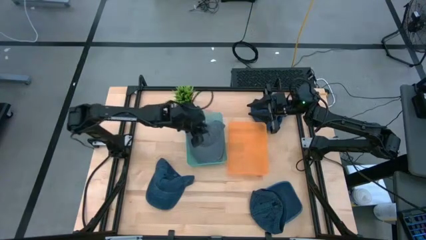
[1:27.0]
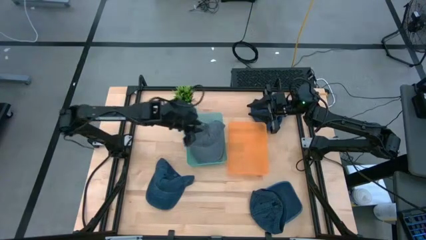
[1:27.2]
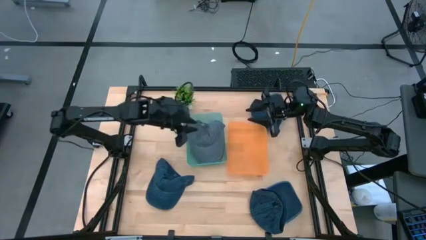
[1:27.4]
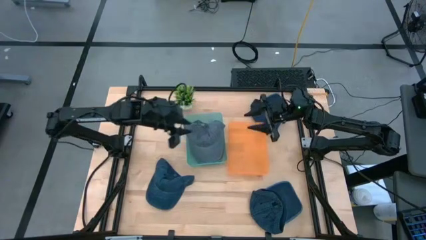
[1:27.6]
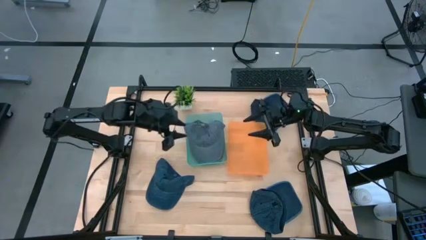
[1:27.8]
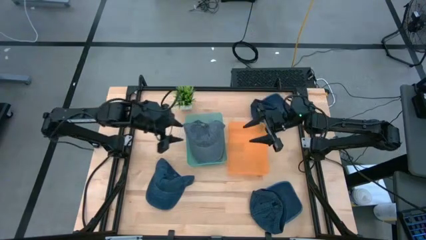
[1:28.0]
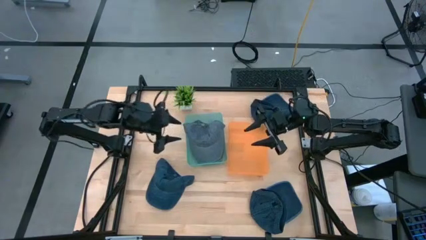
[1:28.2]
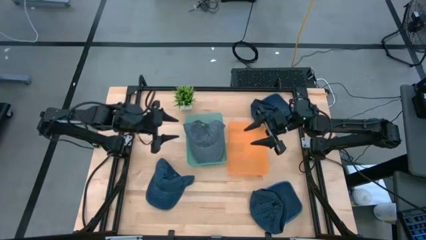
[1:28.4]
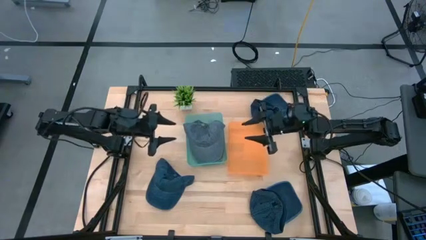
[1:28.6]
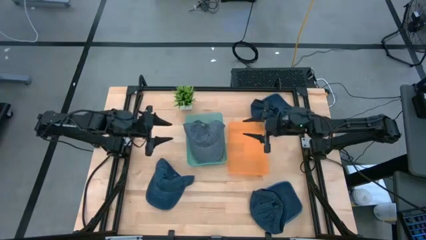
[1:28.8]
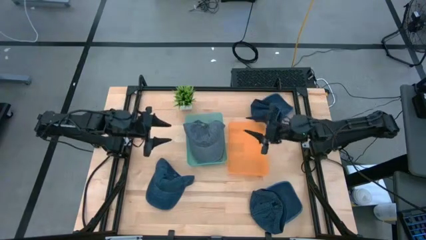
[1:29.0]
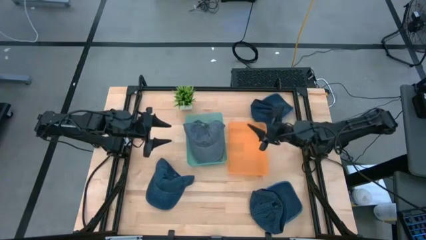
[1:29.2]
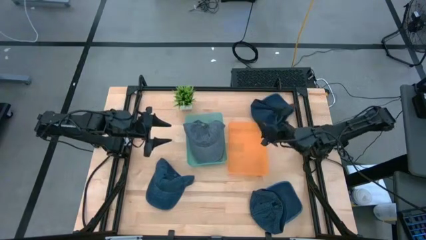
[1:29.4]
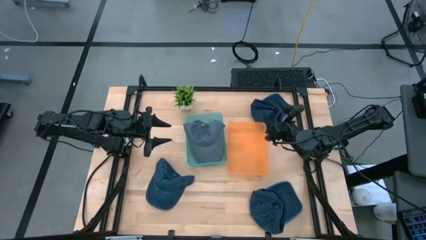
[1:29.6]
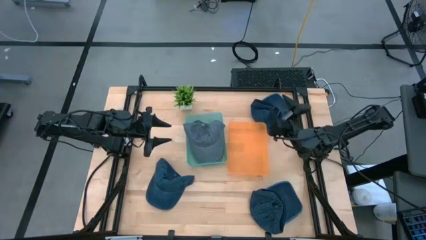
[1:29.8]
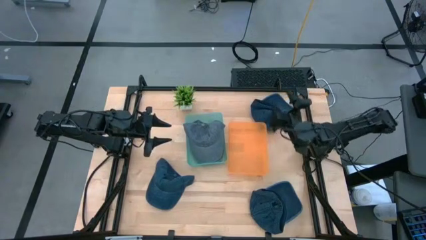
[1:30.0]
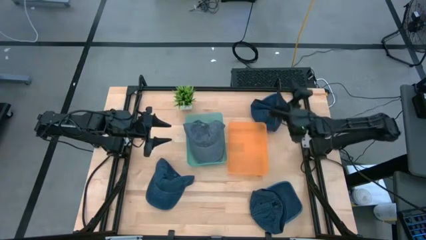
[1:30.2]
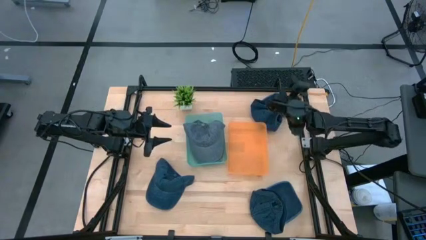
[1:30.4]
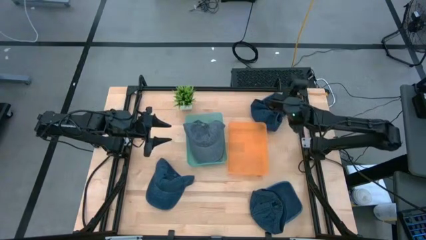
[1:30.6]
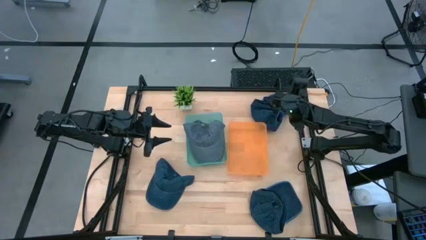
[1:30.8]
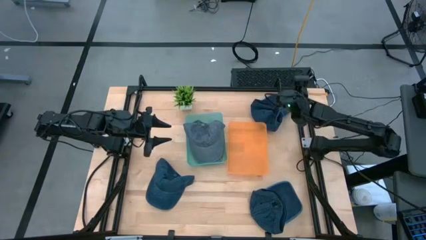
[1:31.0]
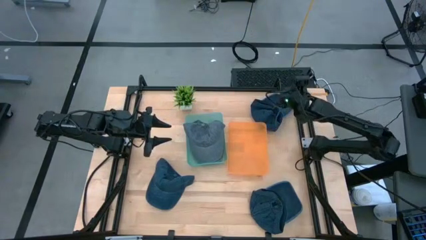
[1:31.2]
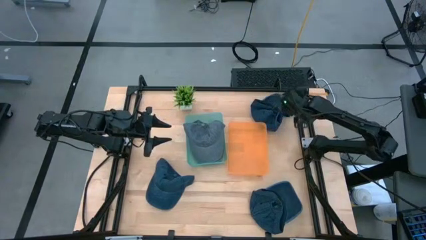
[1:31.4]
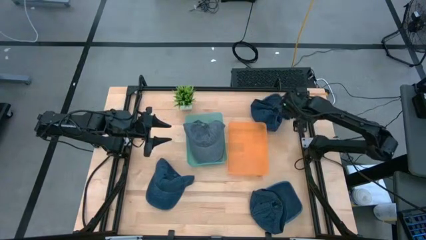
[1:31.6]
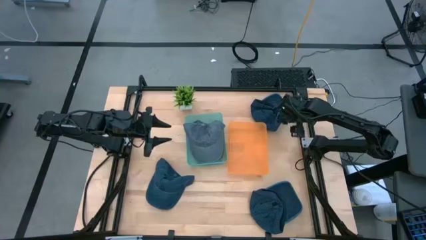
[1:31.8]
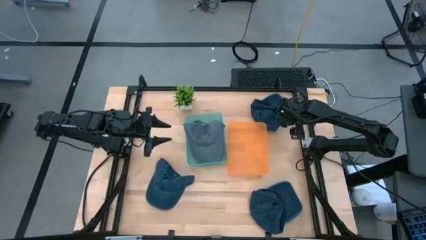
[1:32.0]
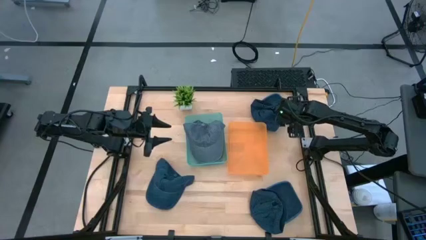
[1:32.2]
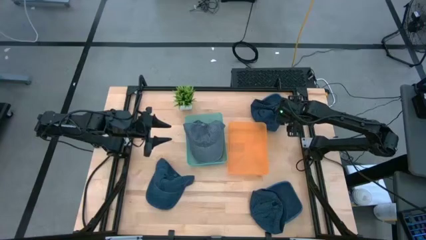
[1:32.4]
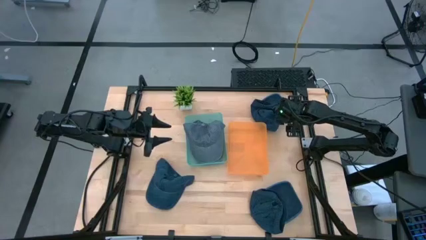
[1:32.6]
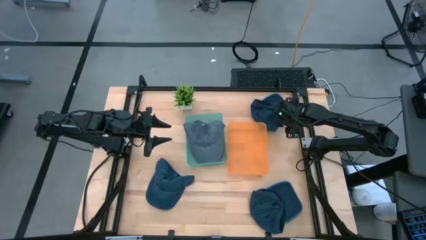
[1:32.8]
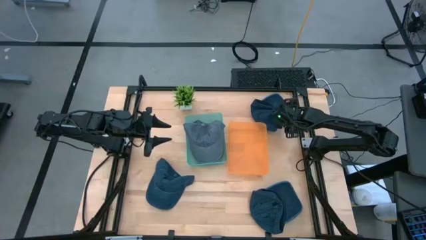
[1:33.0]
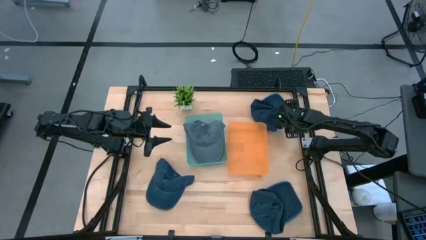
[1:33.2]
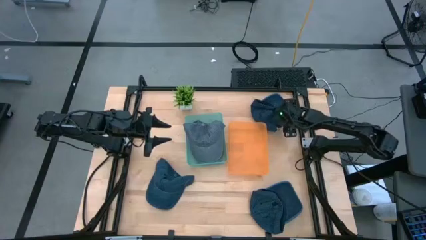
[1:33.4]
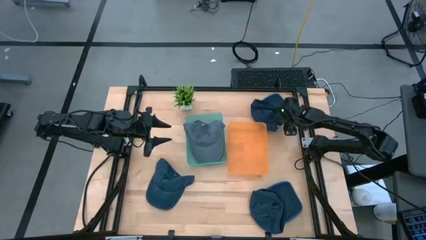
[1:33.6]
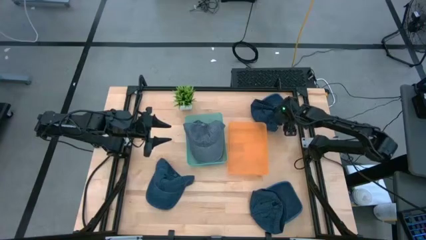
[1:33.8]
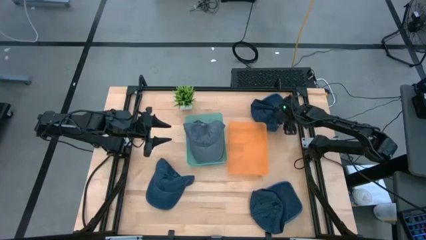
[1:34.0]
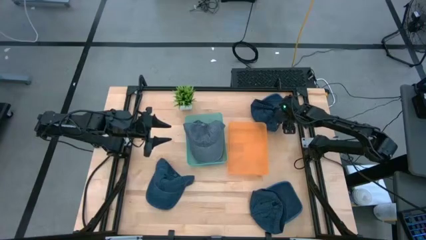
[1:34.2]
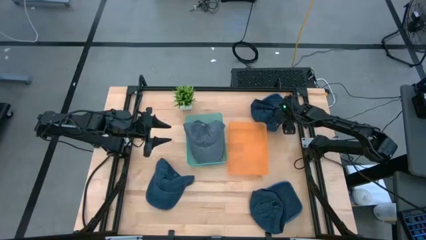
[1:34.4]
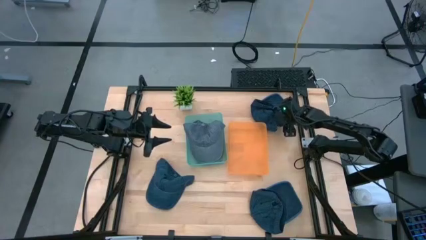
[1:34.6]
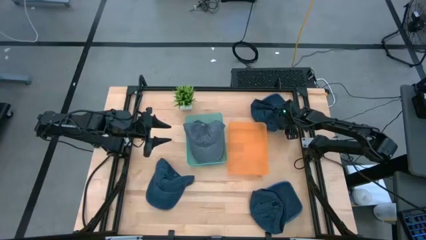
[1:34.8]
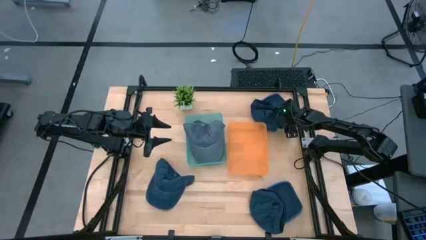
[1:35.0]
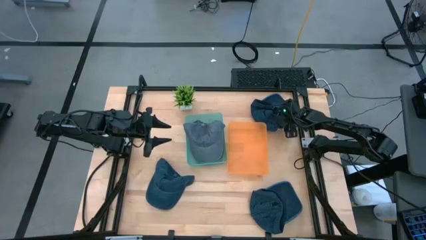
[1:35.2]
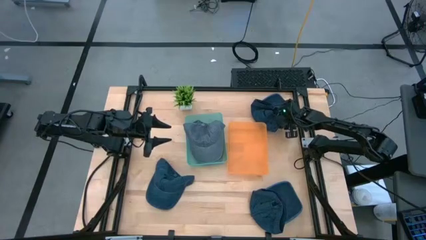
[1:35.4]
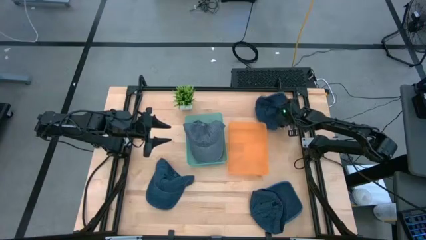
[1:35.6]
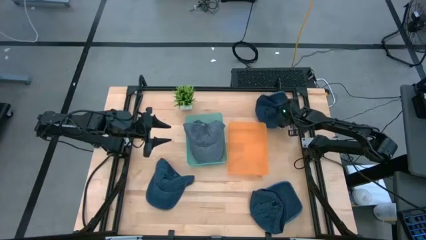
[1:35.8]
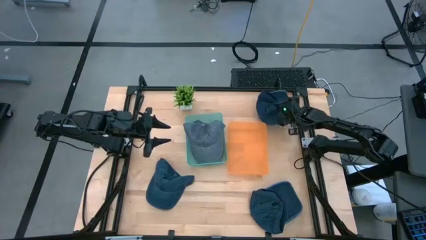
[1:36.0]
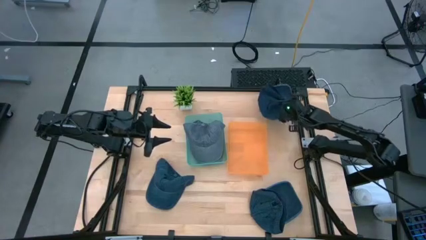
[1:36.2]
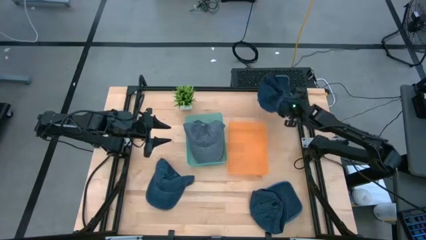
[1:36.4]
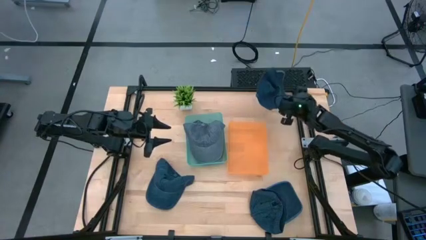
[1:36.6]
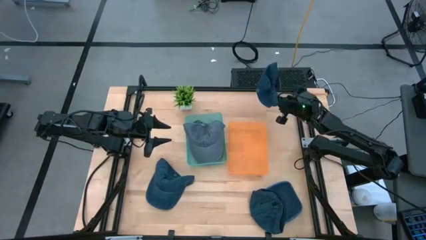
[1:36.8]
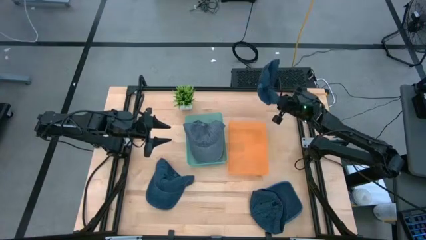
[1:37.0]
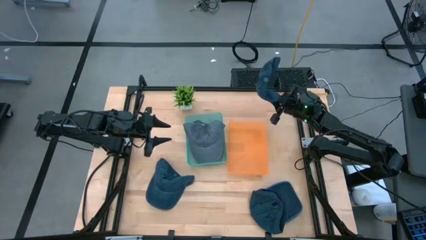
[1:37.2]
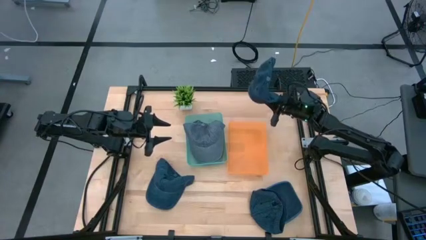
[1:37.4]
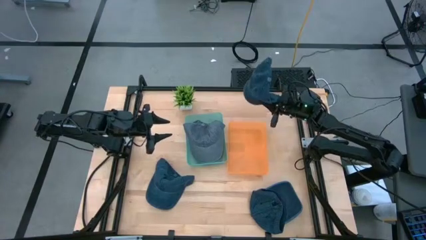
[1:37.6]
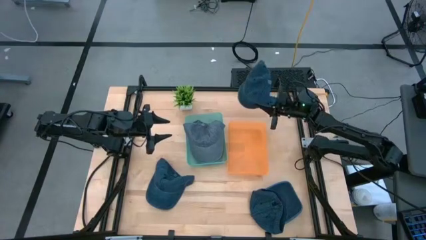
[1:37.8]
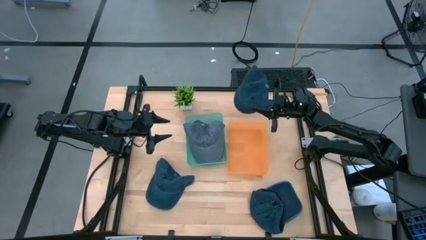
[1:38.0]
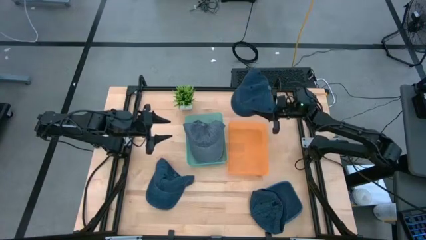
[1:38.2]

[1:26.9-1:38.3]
Task: Pick & Place hat
Put the top right blue cap into the orange bin

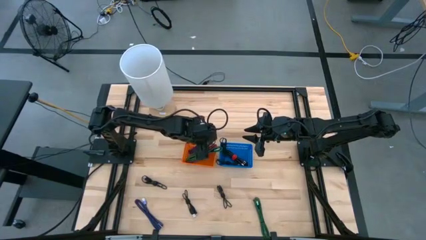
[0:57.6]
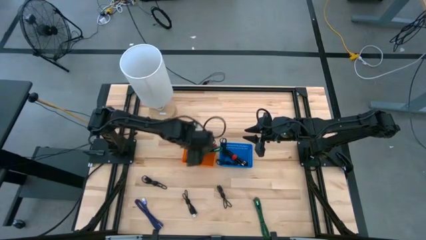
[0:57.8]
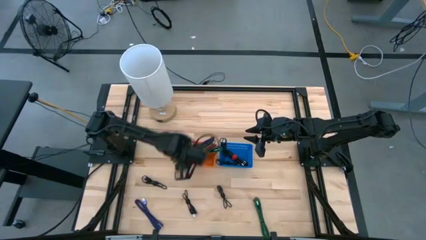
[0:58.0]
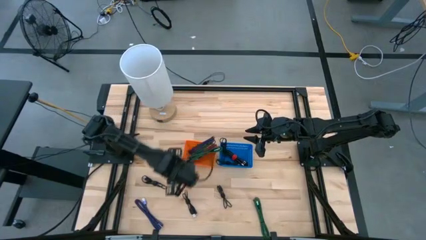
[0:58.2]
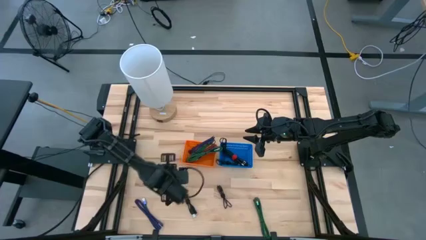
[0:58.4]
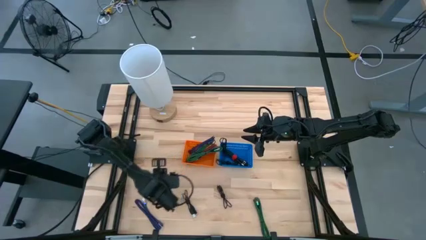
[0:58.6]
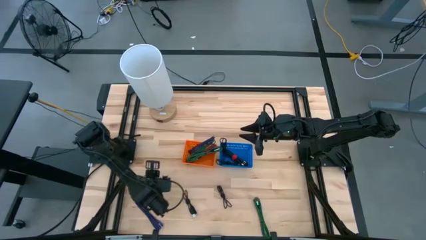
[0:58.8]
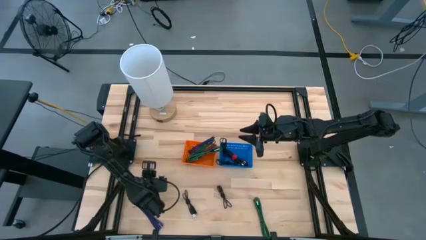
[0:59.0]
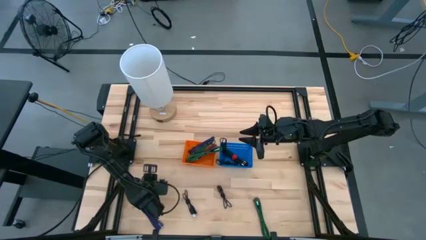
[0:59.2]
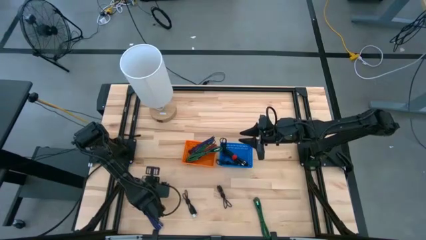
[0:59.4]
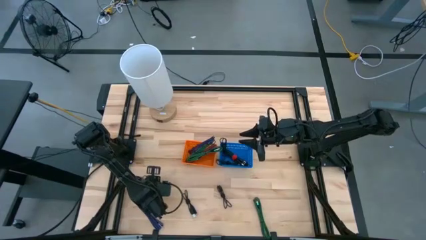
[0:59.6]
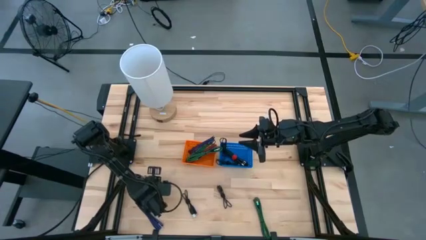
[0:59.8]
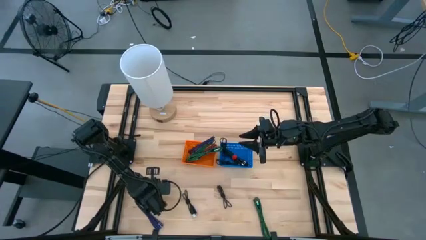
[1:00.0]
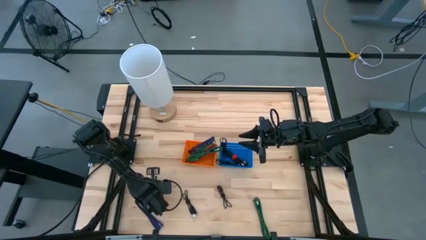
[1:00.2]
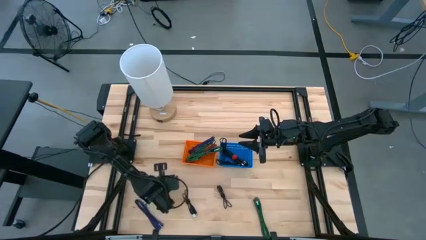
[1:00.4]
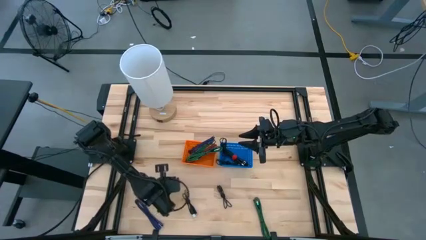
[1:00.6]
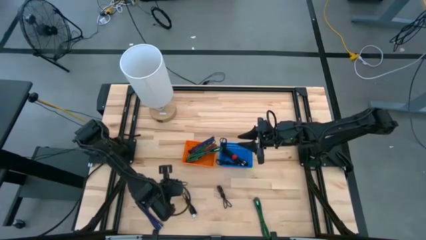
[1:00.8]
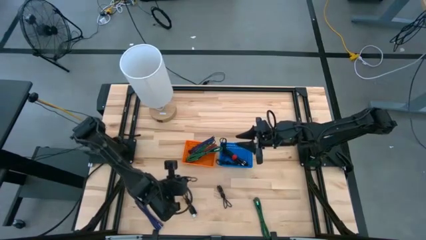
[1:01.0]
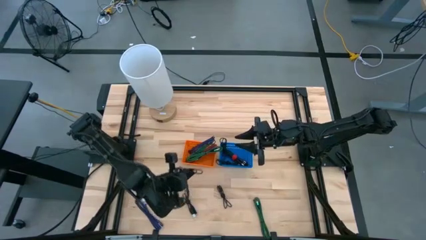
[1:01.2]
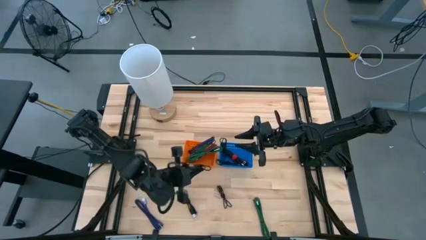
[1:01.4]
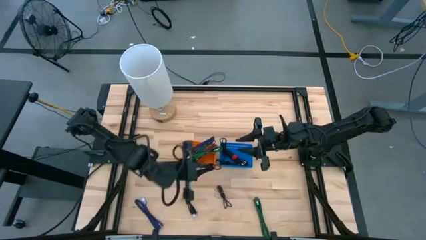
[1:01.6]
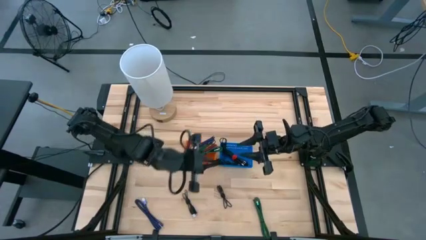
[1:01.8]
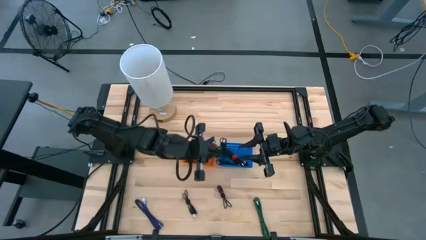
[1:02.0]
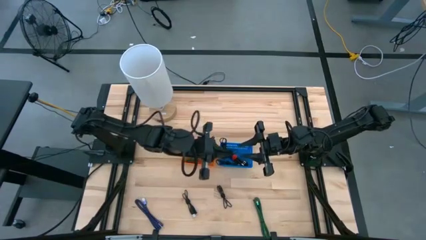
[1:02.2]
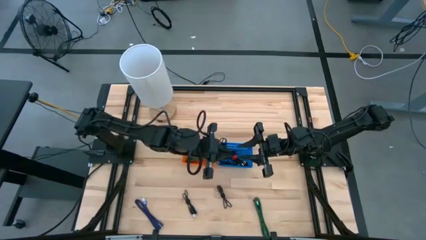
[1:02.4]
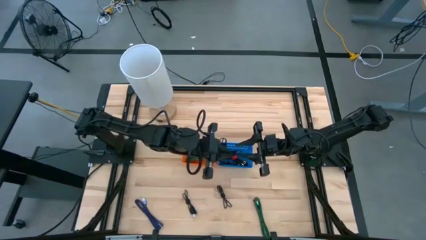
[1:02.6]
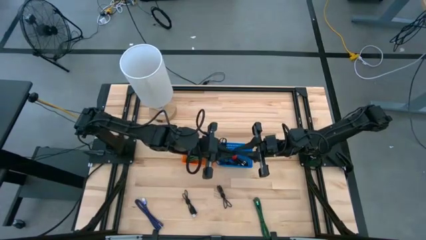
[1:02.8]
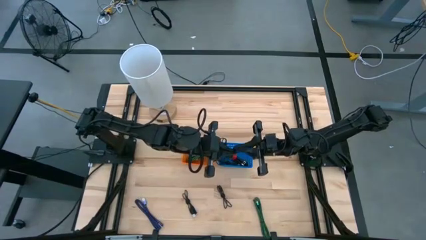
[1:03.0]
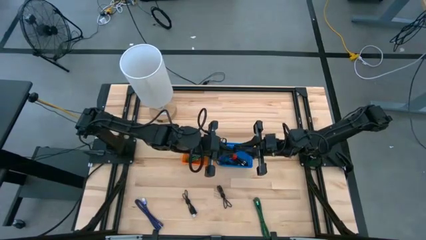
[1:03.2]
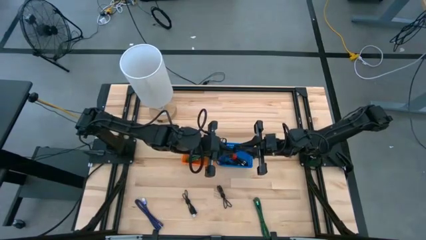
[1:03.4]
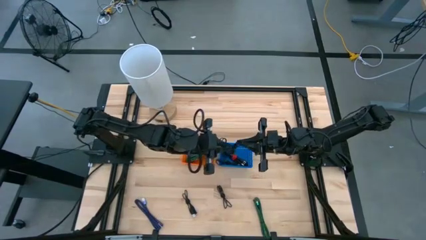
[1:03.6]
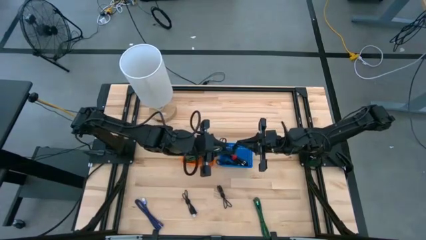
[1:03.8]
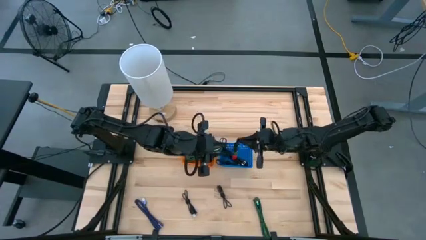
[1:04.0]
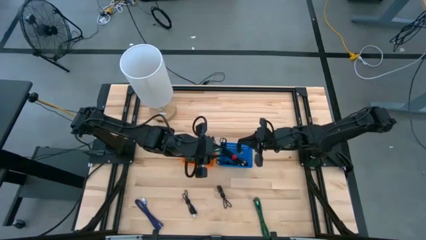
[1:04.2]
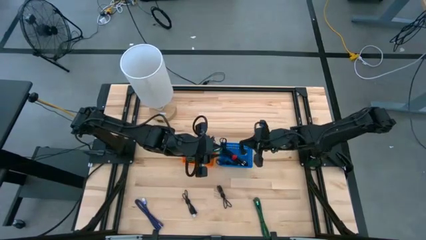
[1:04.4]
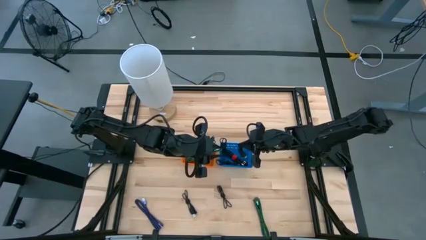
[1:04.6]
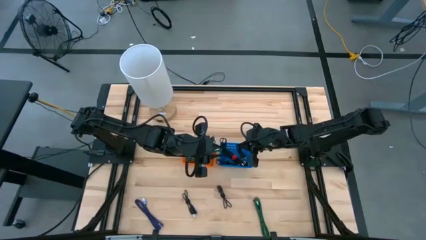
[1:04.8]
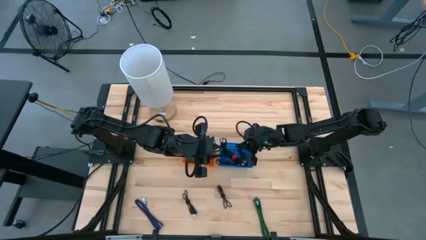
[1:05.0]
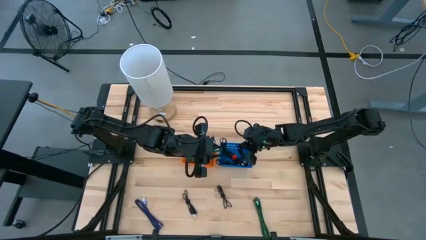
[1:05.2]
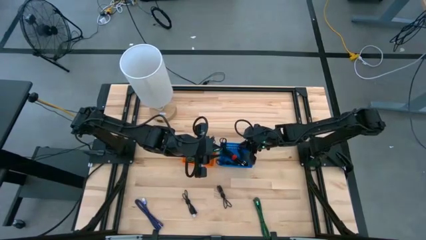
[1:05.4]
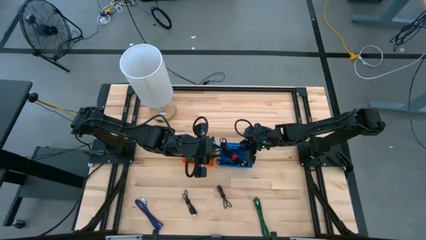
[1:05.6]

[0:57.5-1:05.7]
Task: Pick & Place USB Port
Put the black charger cable into the blue bin
